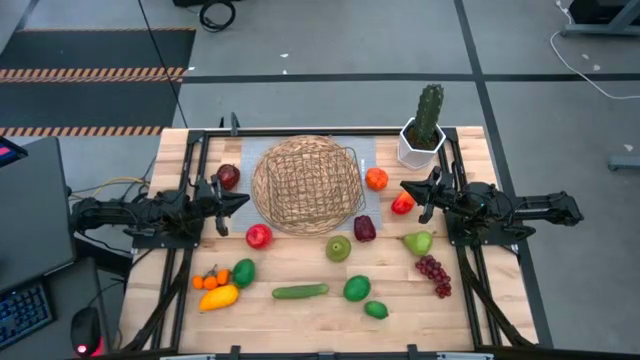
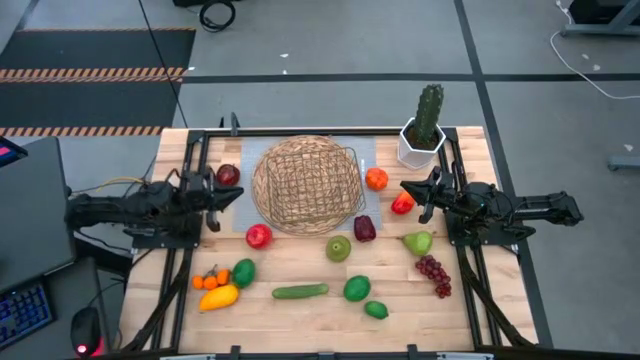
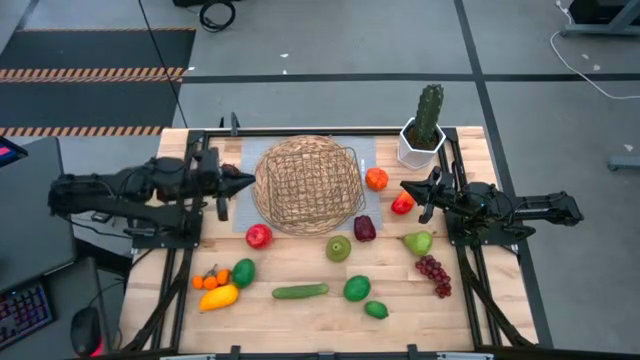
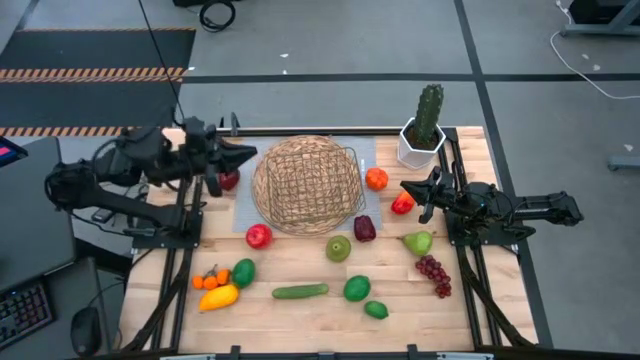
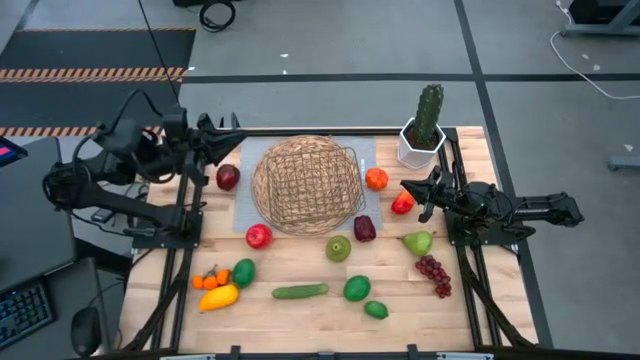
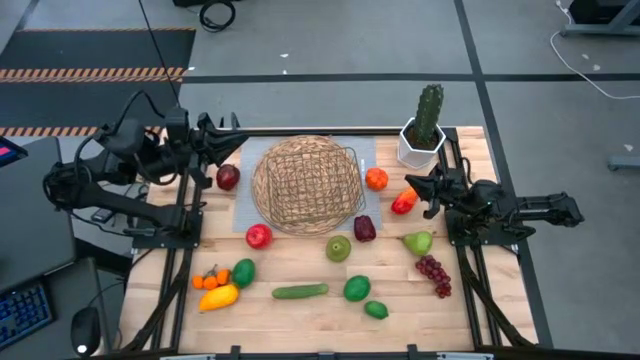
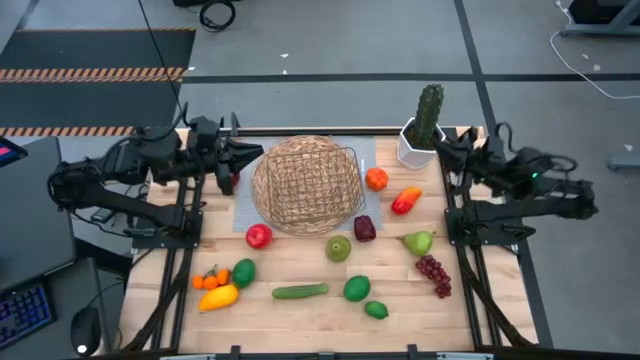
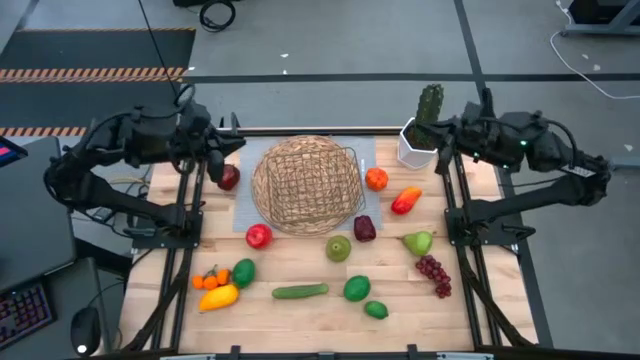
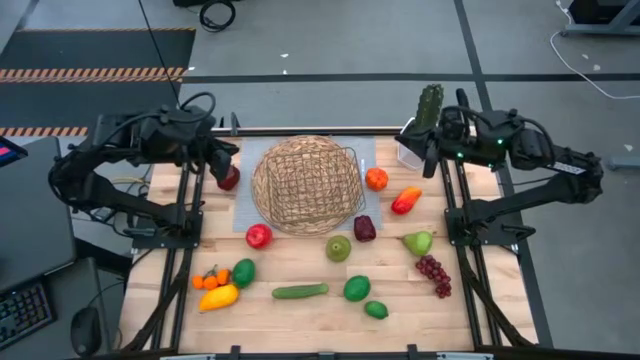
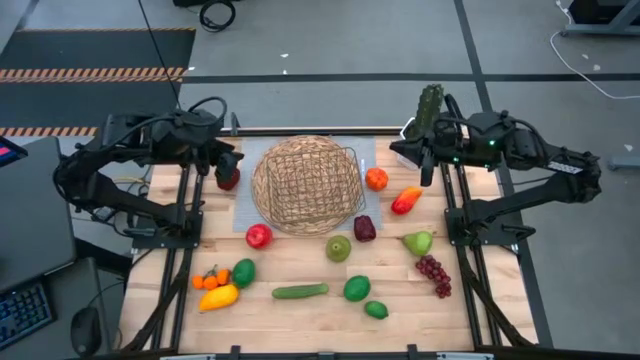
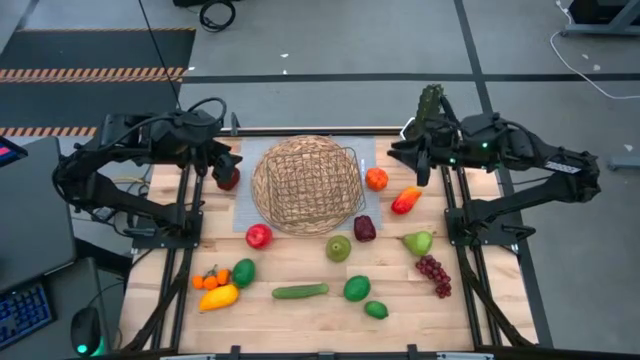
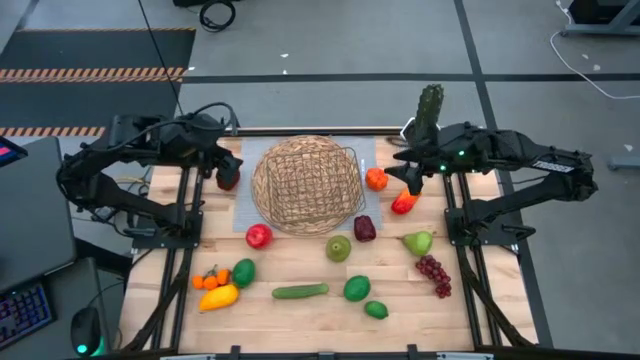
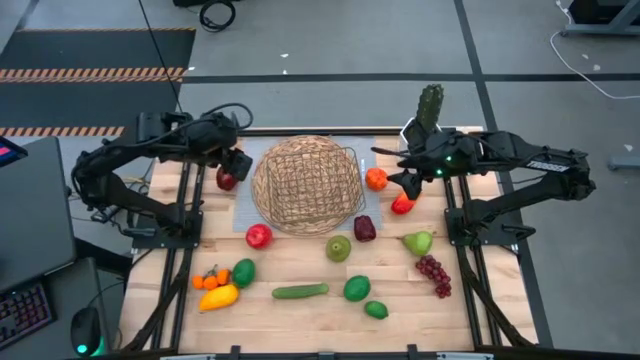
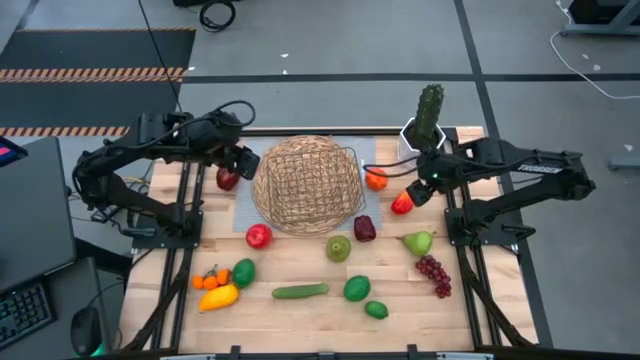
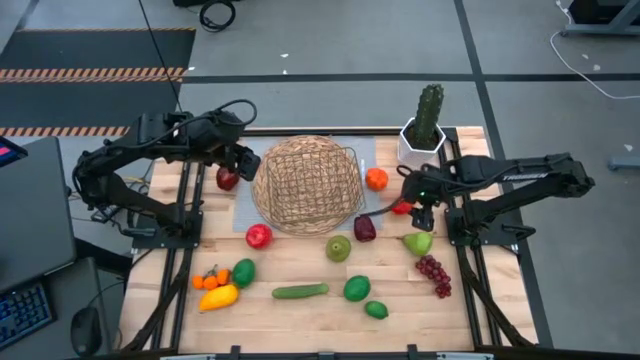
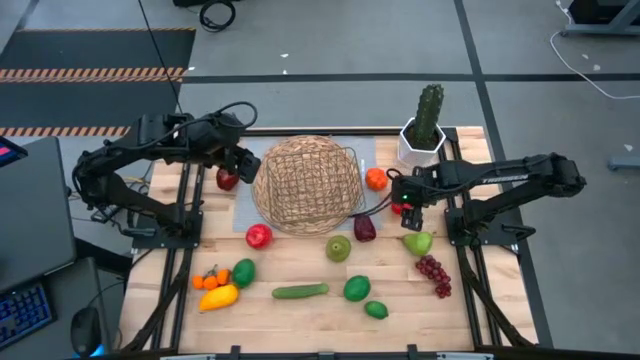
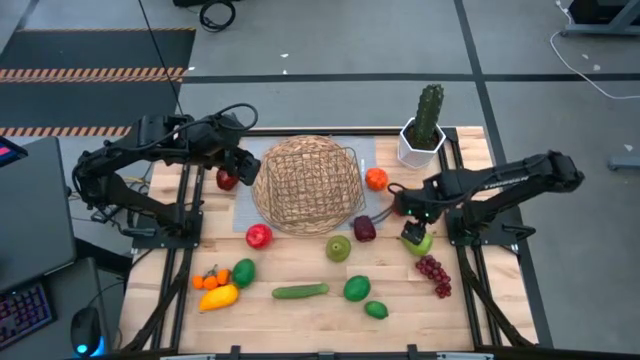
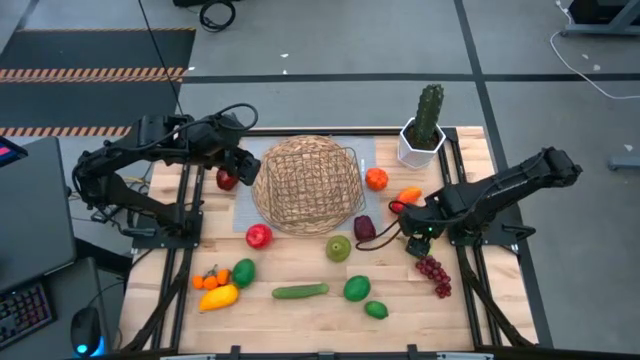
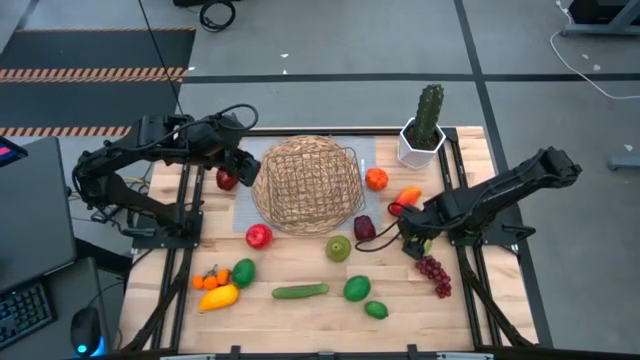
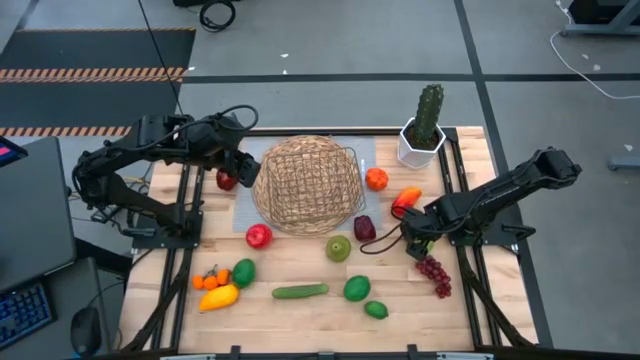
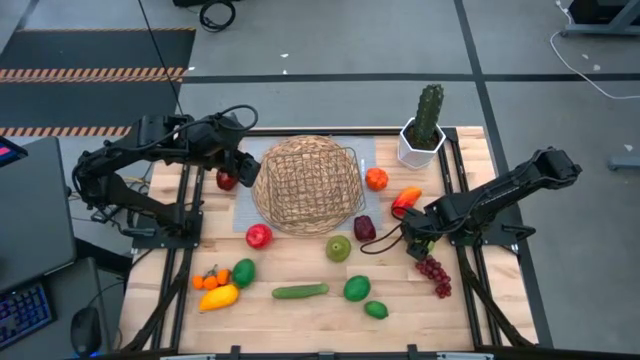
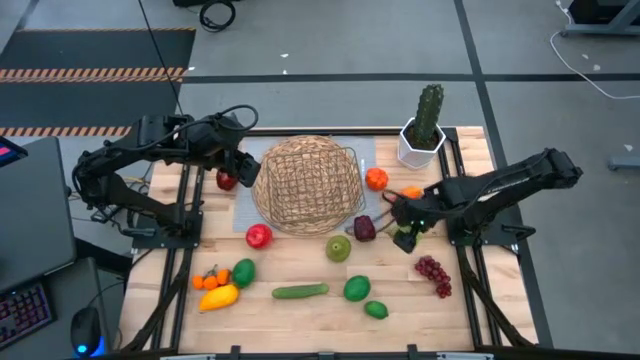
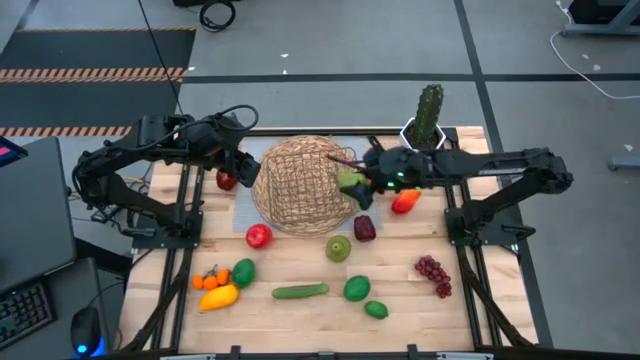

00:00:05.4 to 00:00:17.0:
Task: Build produce basket
Put the right pear into the gold wire basket

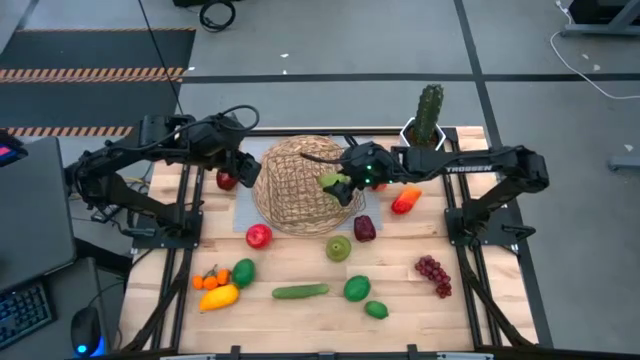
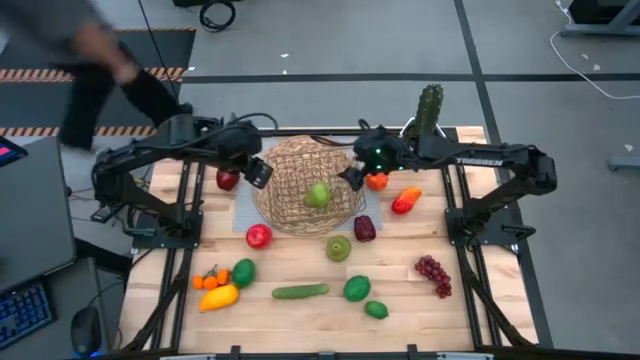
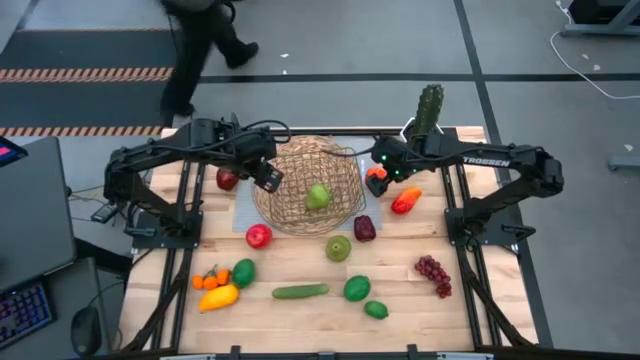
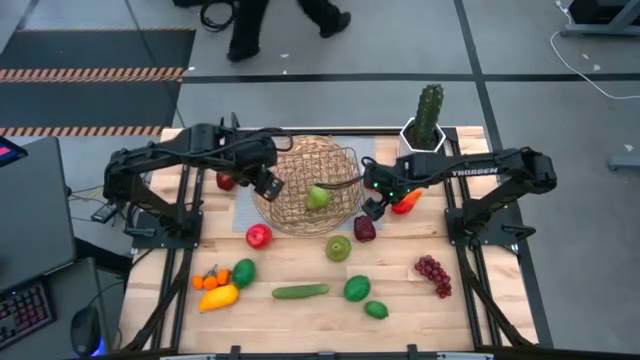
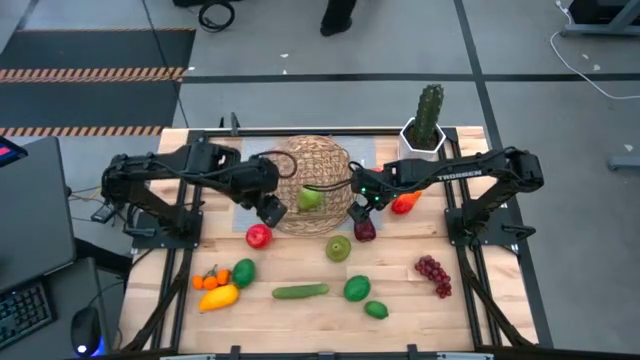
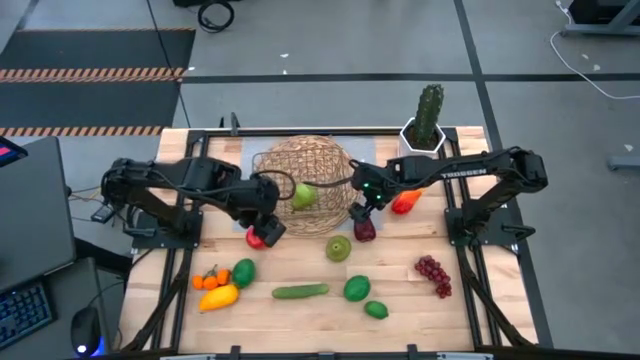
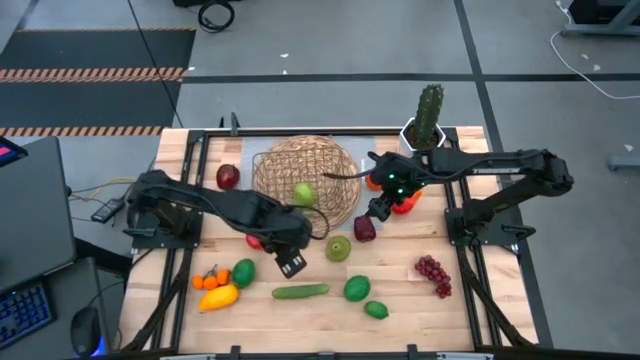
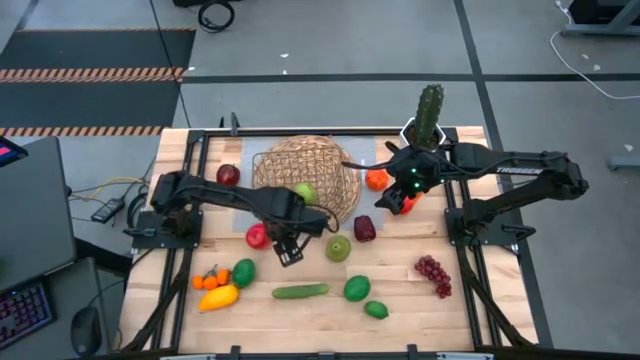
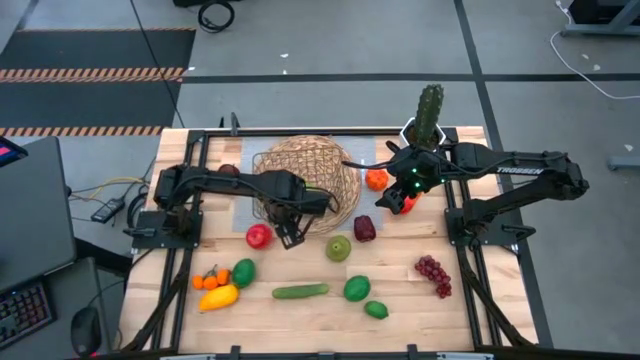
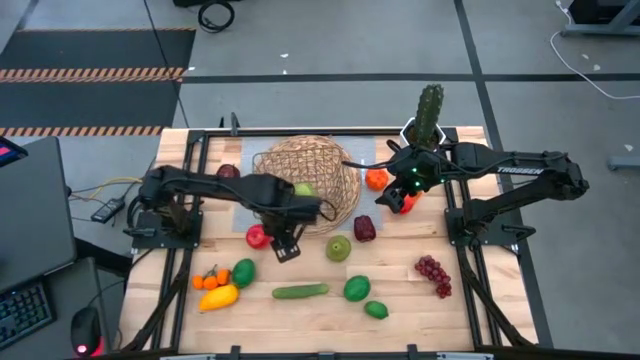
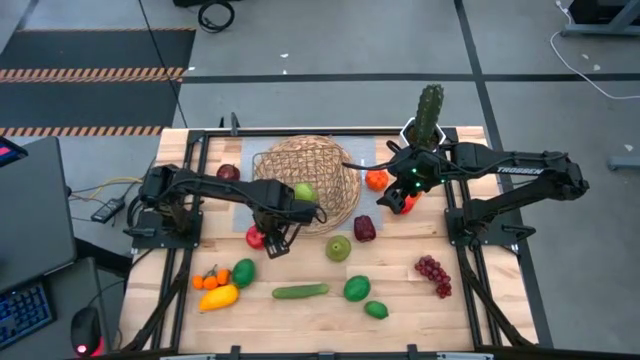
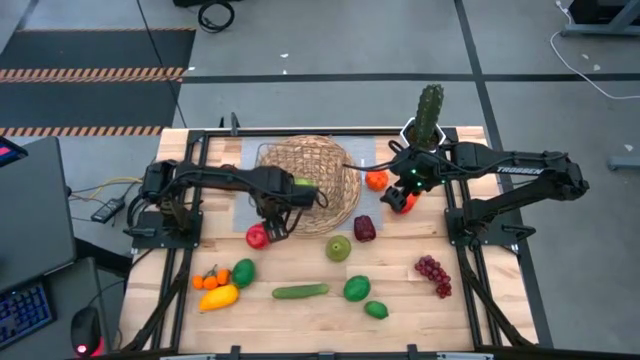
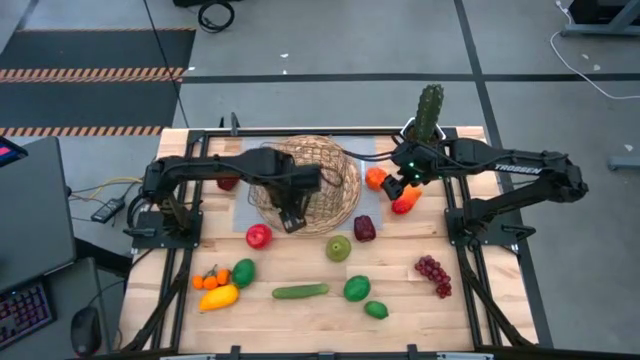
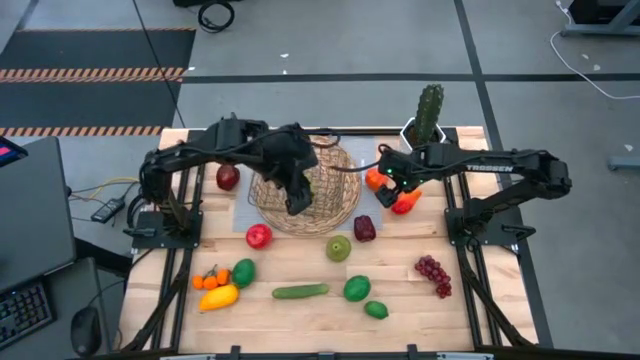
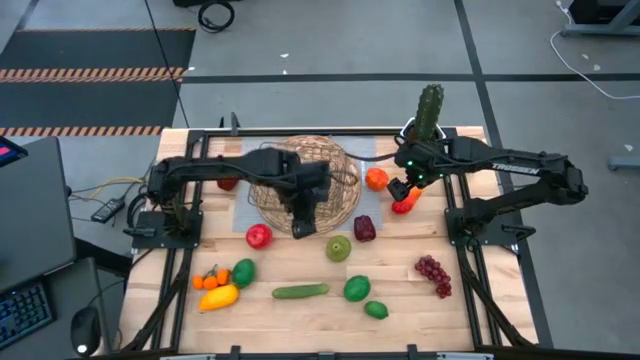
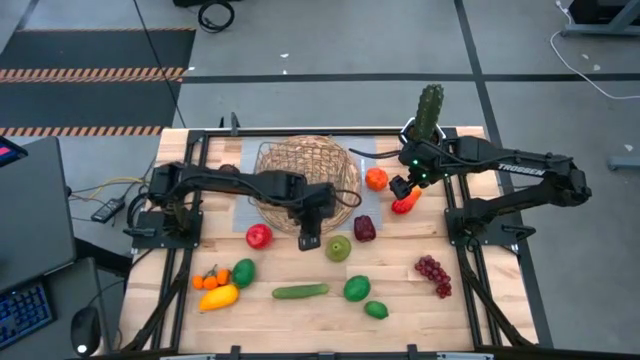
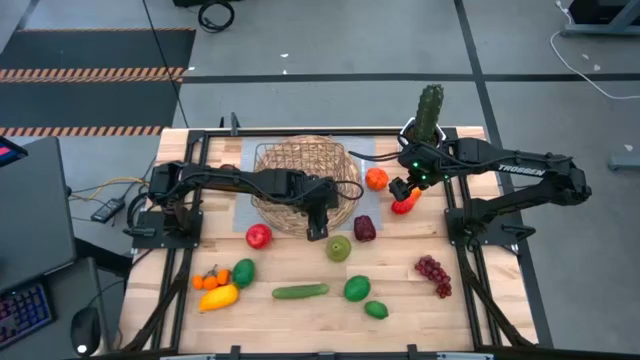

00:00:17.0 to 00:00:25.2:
Adjust the gold wire basket

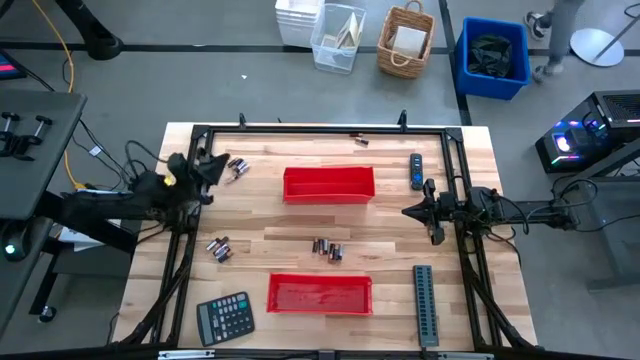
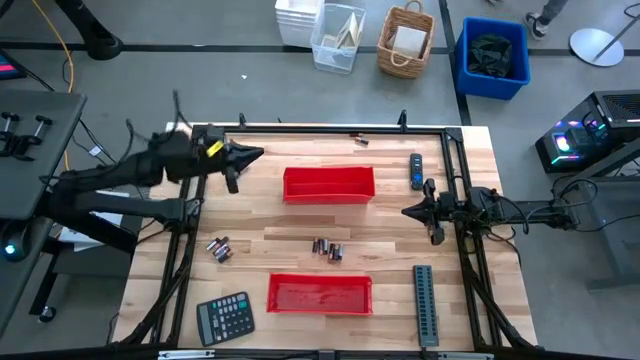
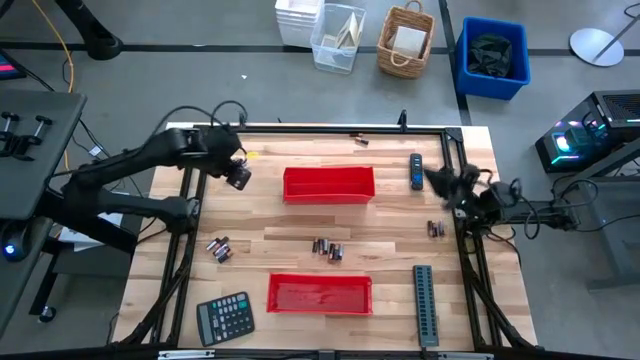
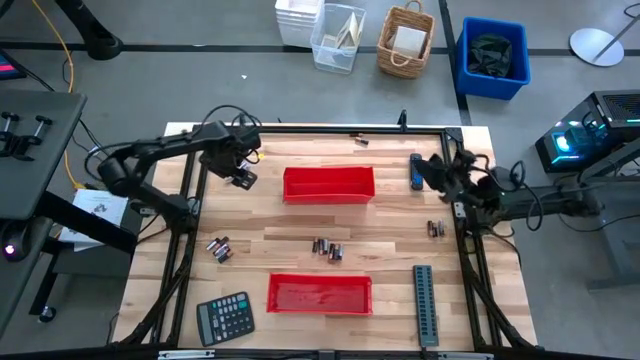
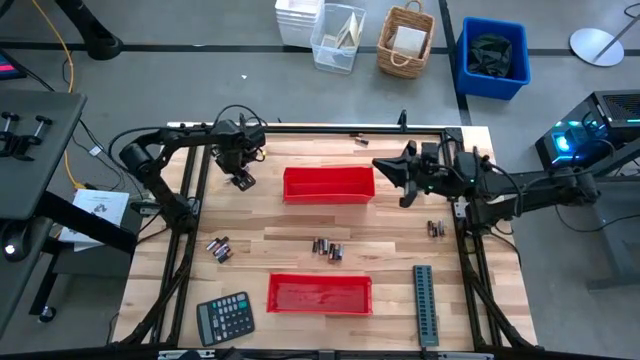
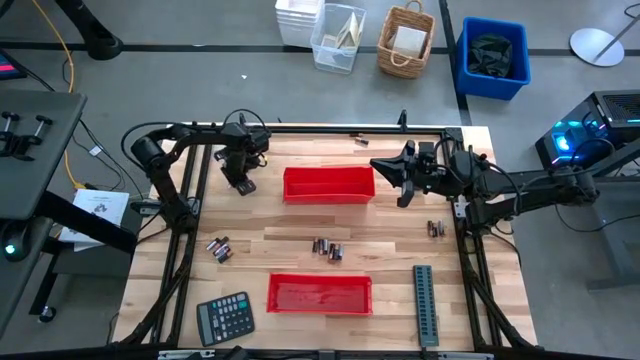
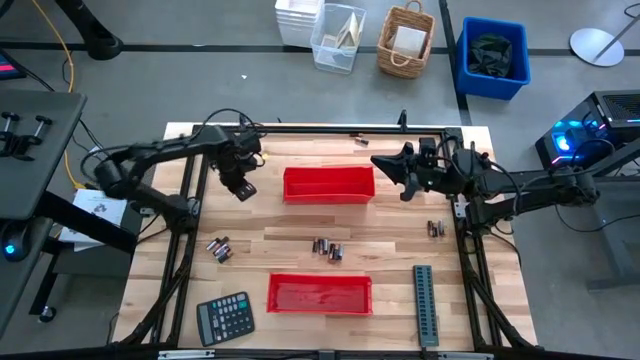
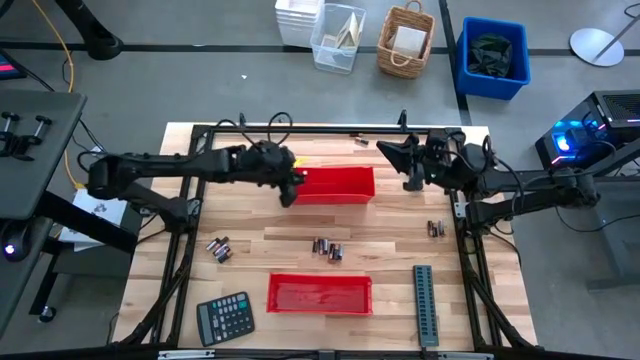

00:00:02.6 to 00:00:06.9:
Task: Sort batteries
Put the silver battery into the top red bin
